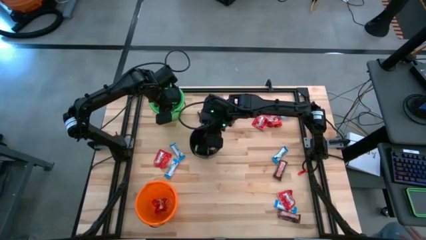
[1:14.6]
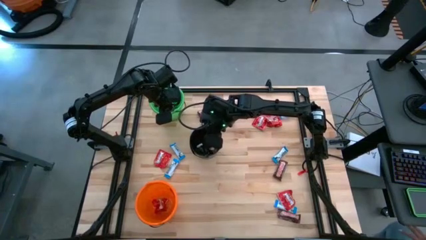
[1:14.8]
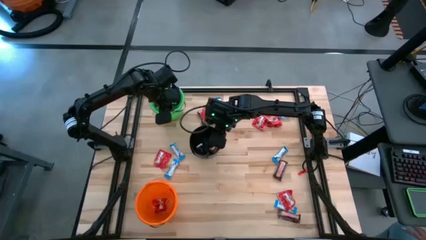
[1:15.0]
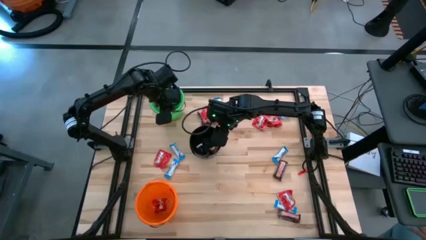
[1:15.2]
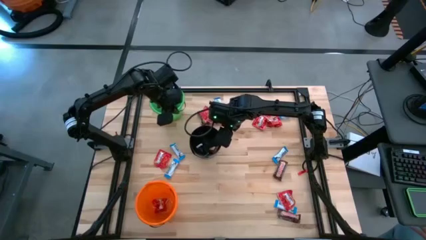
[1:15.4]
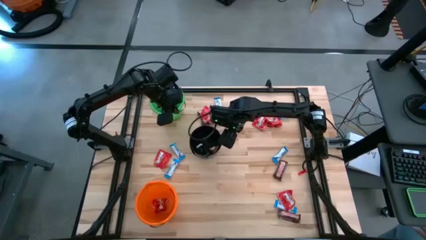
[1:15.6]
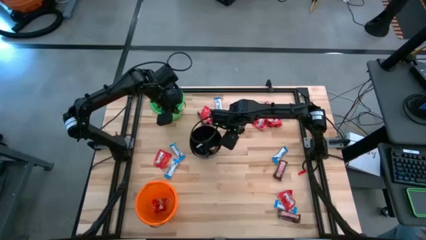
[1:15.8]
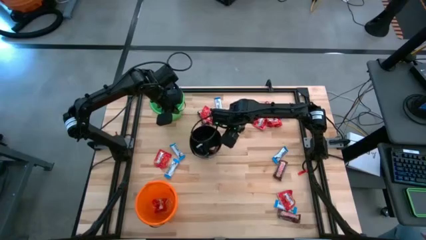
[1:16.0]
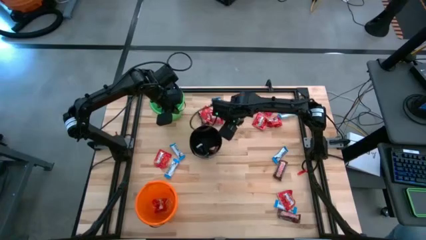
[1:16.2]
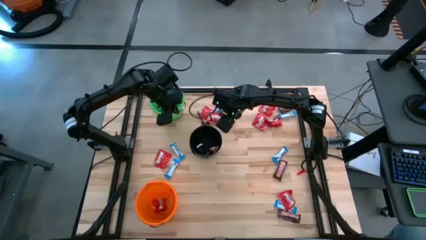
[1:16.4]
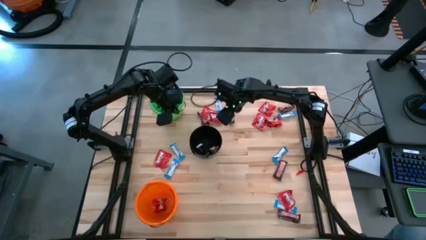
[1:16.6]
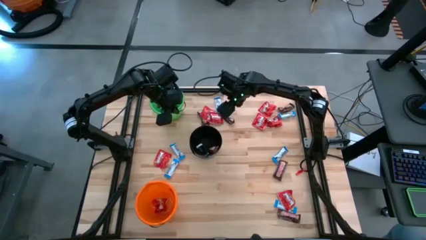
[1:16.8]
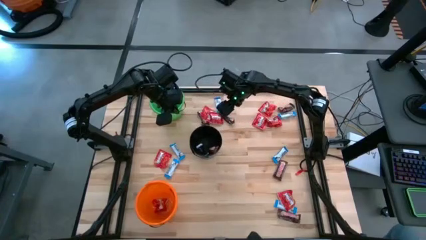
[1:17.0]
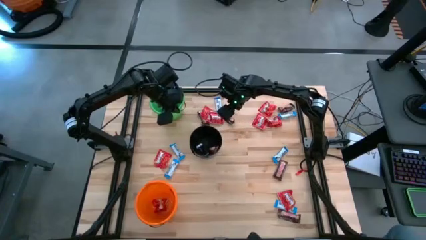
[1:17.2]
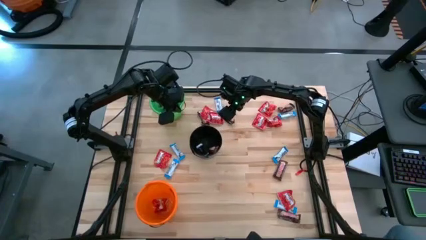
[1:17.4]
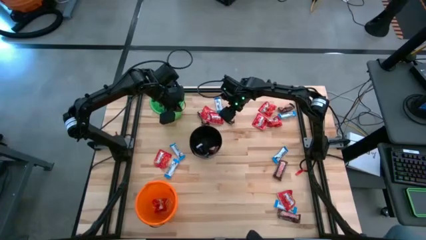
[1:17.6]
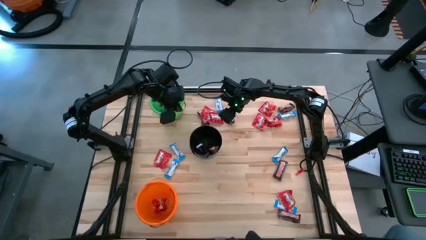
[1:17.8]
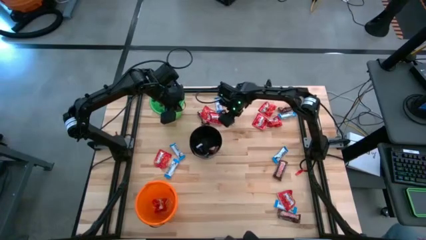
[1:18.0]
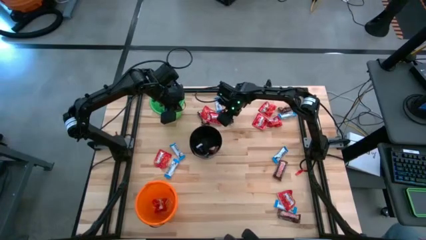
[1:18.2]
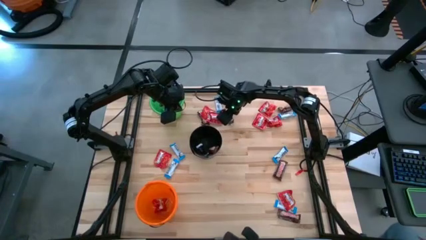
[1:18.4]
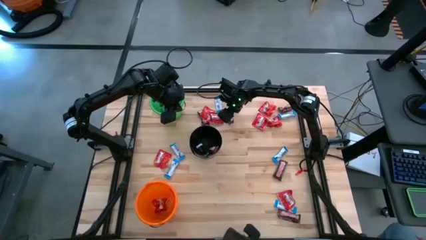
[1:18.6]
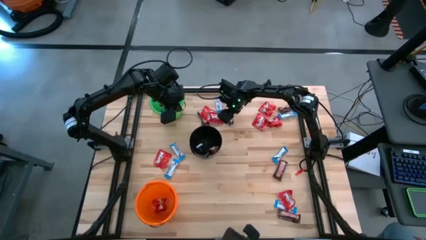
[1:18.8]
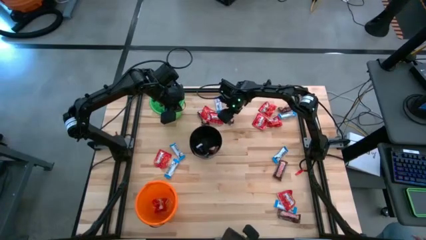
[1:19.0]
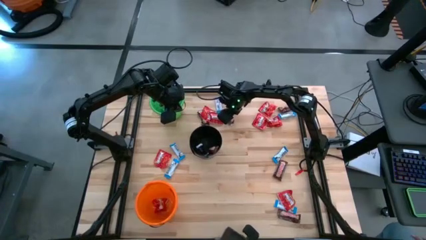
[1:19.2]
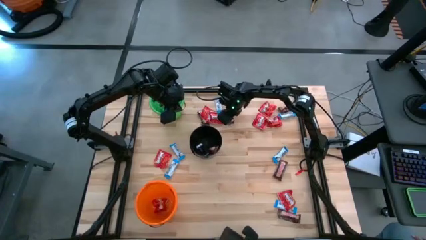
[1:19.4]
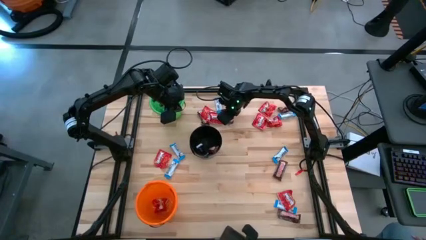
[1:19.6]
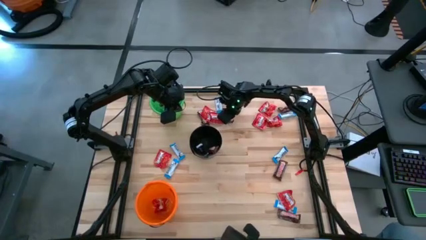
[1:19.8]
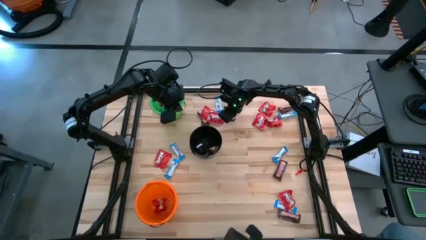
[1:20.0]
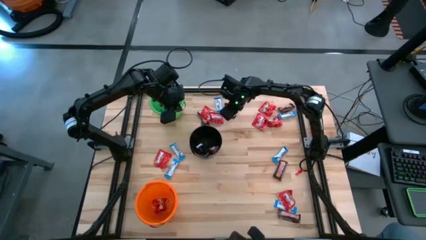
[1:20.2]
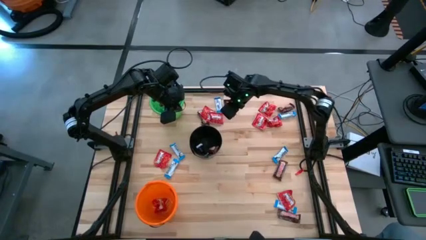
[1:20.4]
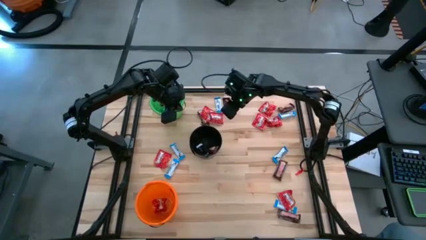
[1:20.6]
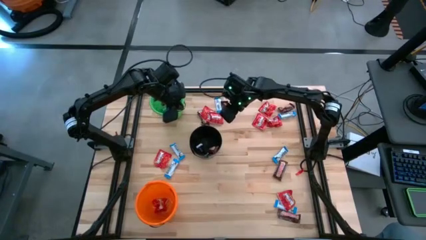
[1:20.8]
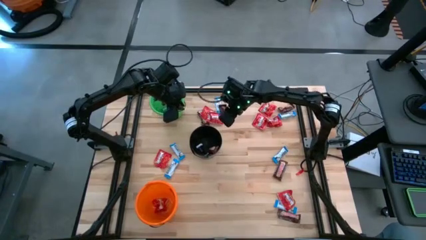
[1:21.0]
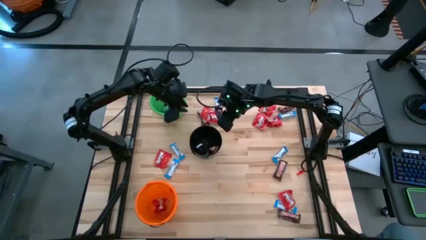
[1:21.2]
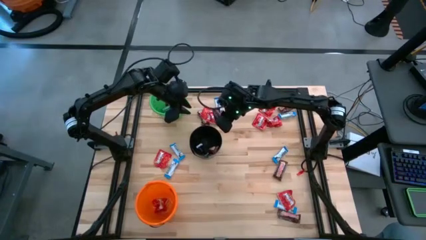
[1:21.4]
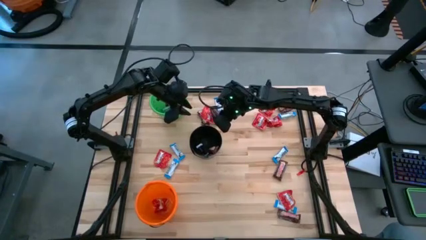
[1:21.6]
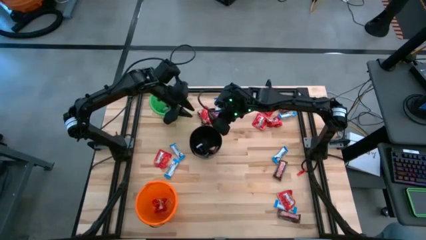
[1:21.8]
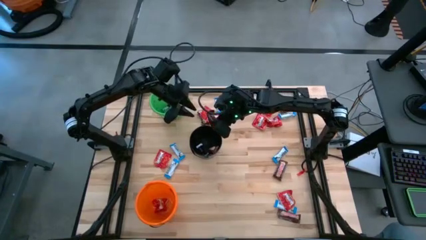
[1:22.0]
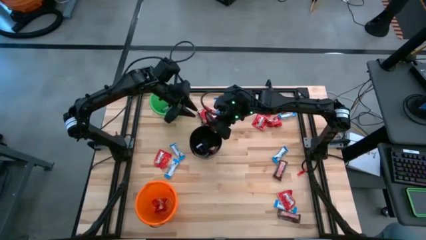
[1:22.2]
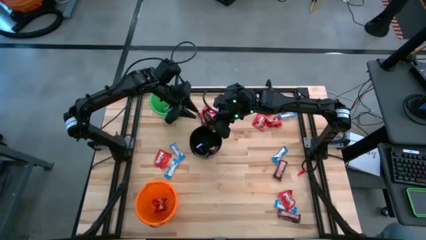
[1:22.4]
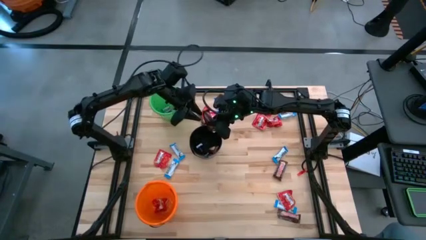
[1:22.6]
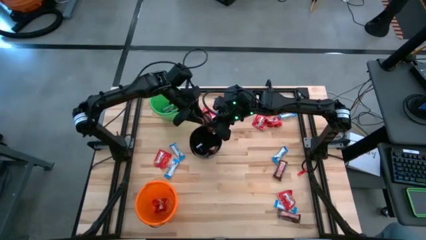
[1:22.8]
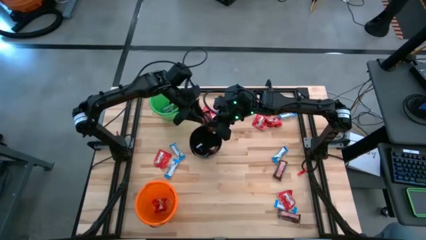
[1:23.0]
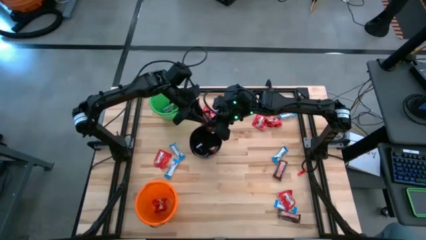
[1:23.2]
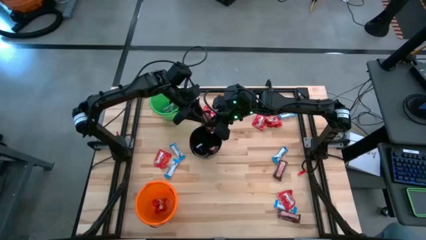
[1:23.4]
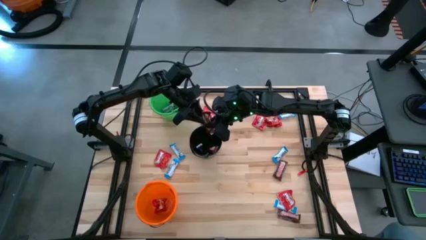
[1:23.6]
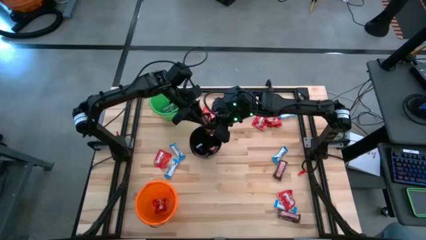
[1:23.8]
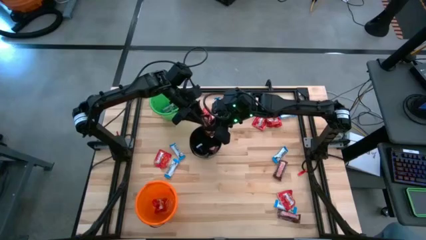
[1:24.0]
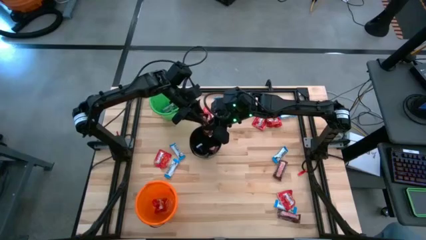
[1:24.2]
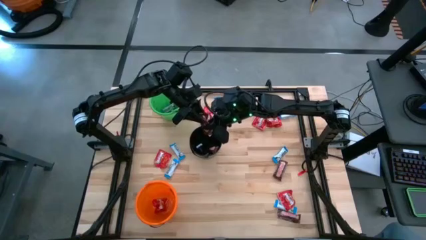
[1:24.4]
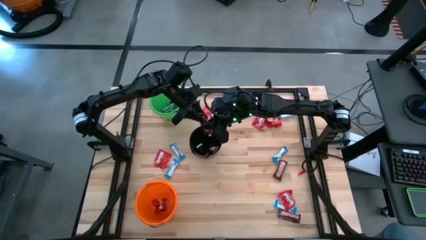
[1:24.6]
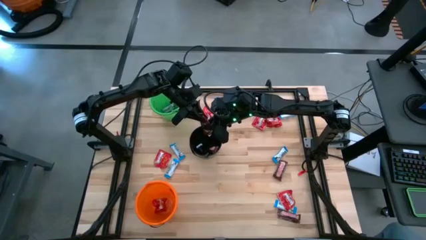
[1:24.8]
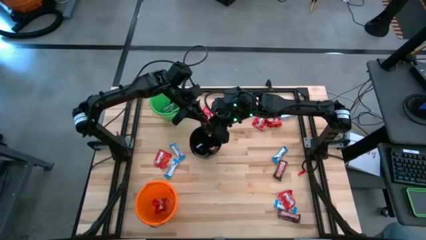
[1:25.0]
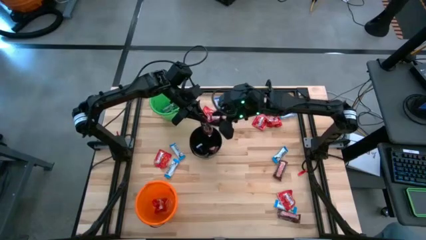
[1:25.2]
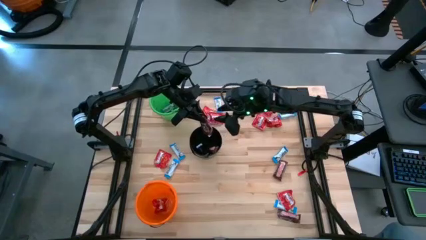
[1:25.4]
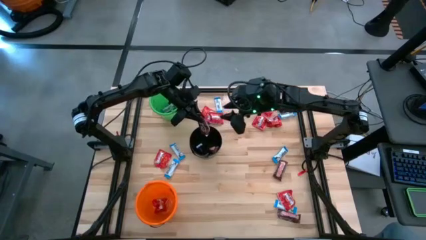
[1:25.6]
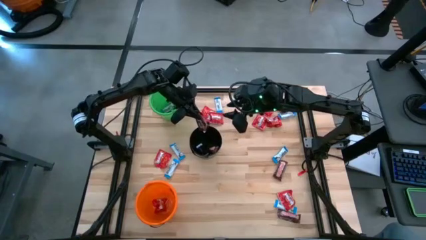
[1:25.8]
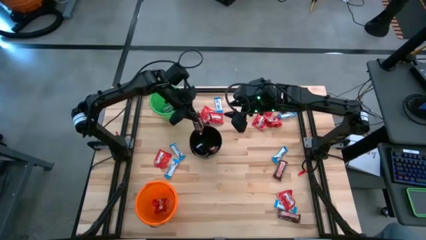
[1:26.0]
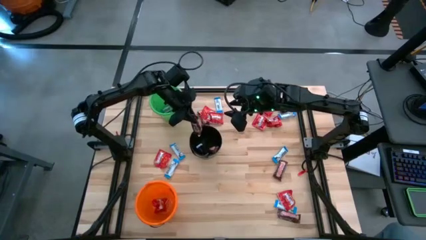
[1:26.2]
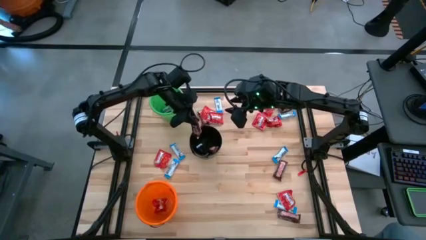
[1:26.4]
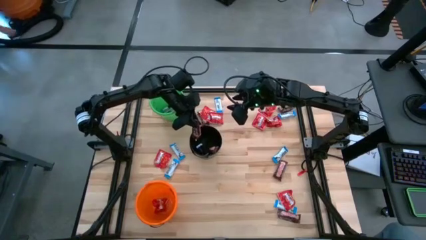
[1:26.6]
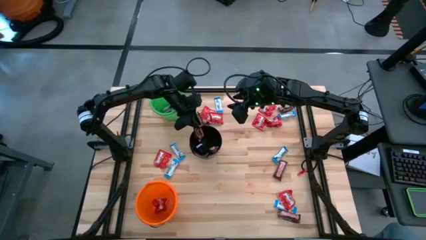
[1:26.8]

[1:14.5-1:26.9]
Task: Sort candy
Put the brown chocolate into the black bucket

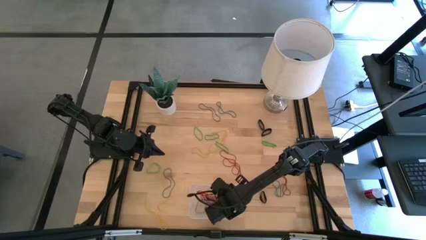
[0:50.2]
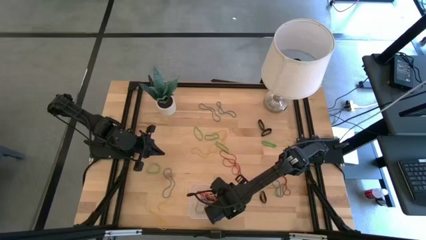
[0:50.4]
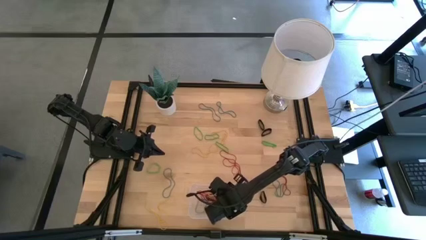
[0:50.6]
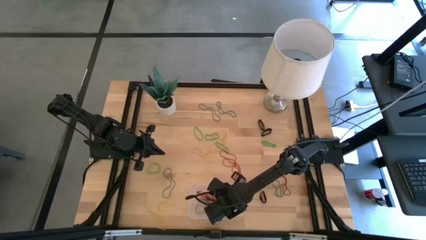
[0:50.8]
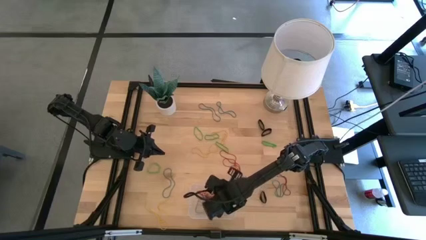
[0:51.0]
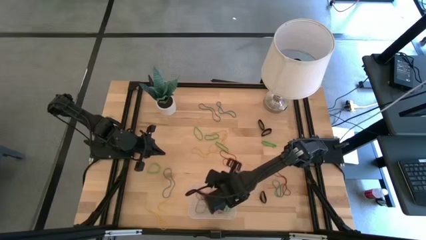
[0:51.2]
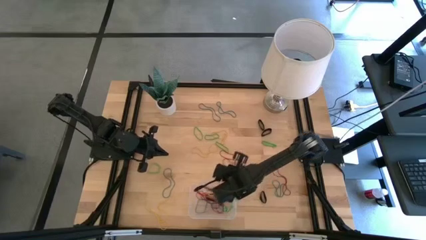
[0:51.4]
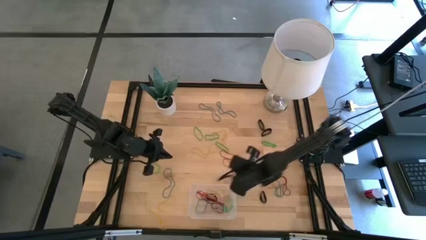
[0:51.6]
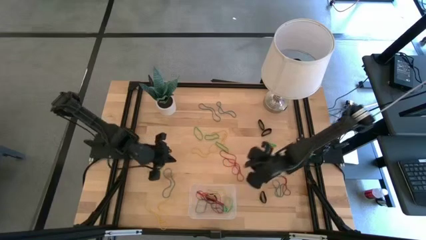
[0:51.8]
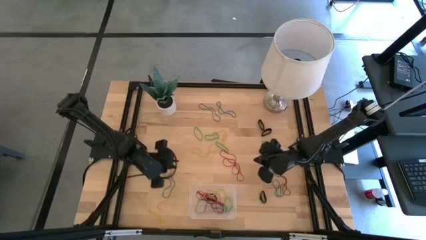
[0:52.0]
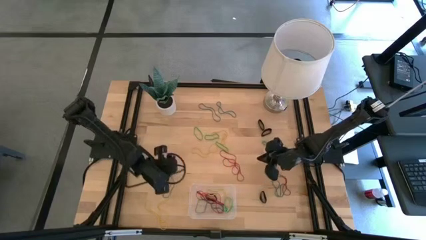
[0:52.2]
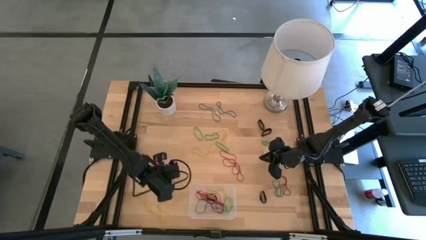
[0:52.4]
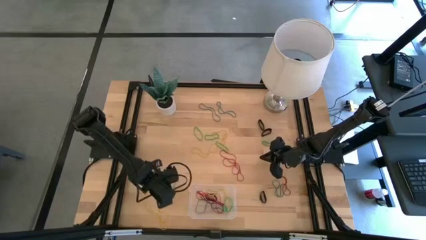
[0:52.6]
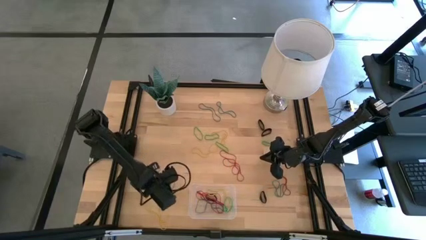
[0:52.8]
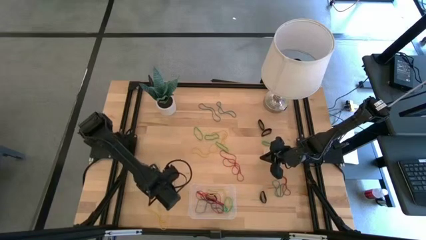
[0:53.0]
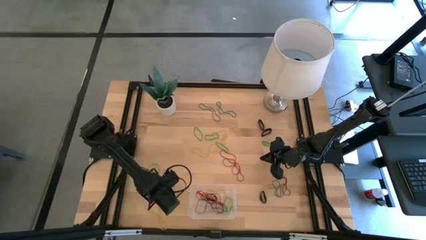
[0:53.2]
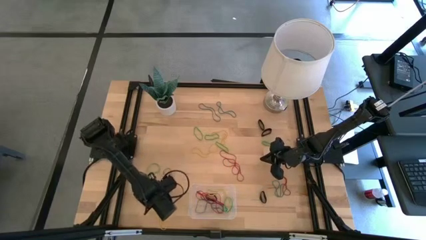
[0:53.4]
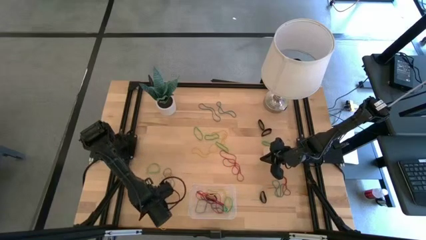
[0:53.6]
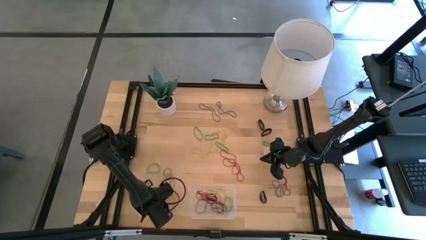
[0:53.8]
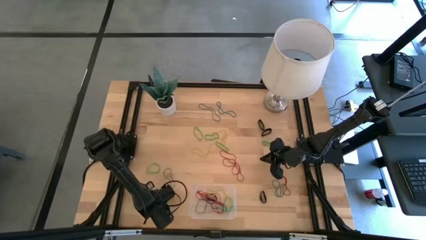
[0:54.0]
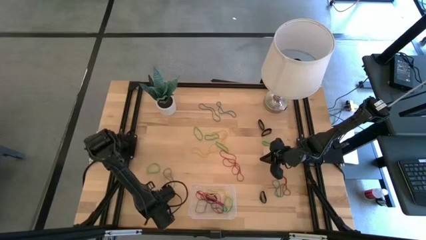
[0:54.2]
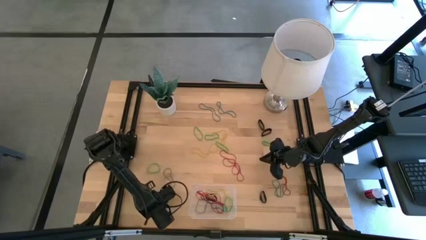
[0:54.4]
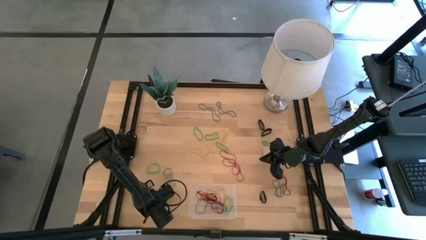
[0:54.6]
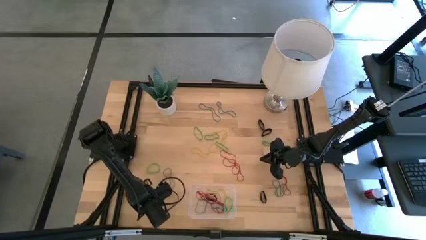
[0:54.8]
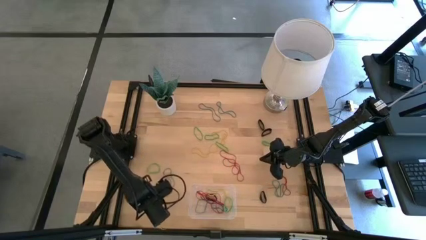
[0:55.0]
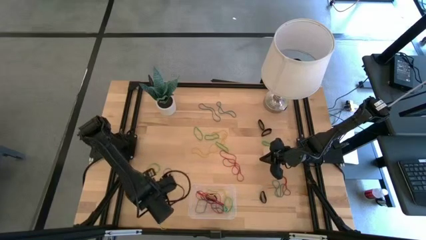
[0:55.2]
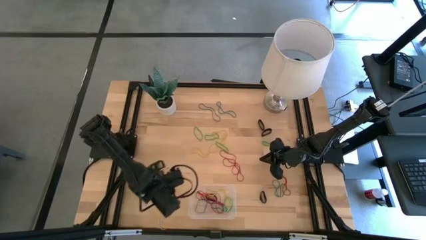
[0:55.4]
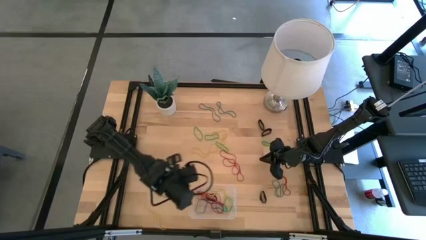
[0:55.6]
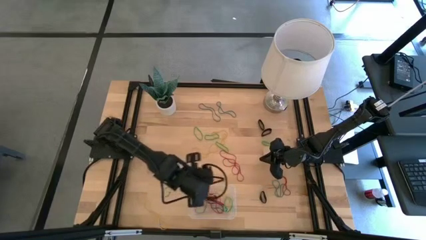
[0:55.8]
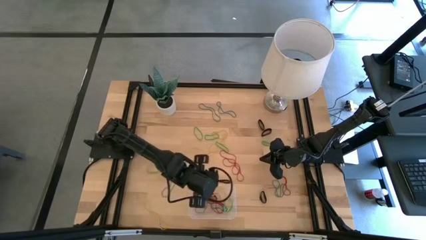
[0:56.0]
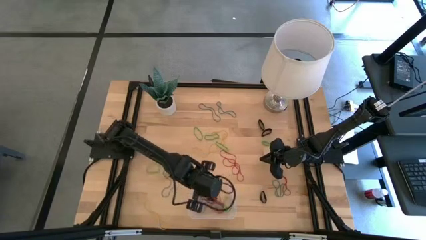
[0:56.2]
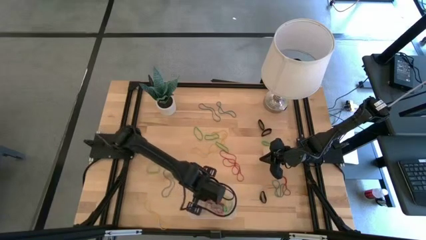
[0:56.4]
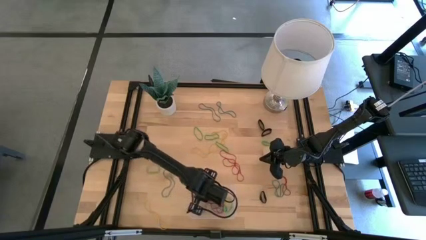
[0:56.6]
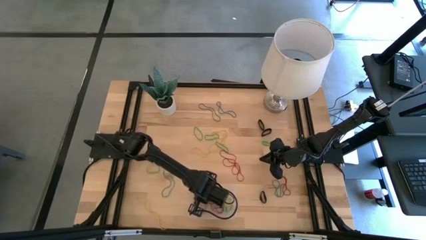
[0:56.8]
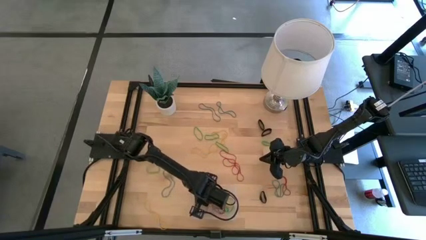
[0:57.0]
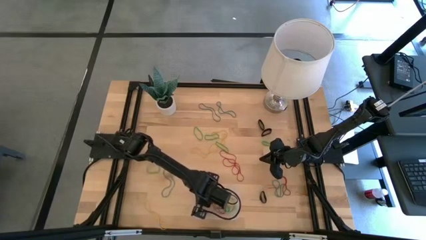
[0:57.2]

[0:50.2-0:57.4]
Task: Pick and place rubber bands into bin
Put the yellow rubber band into the transparent bin
